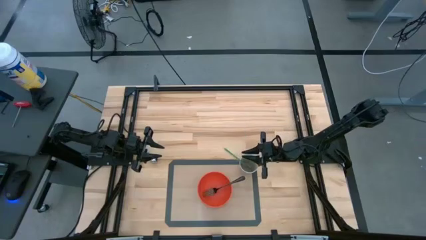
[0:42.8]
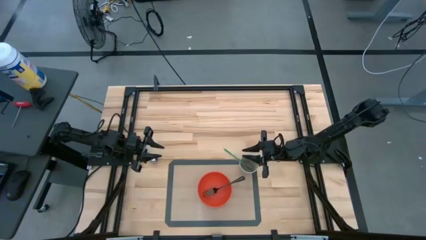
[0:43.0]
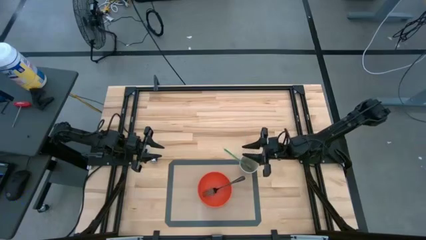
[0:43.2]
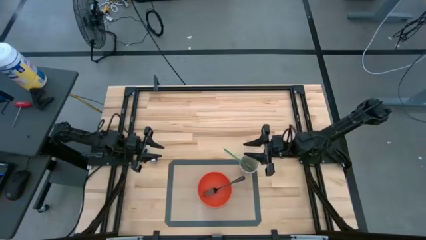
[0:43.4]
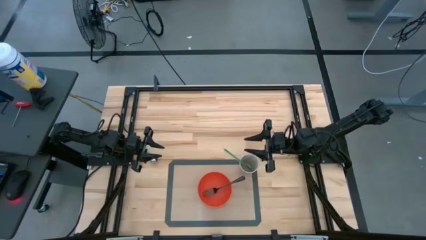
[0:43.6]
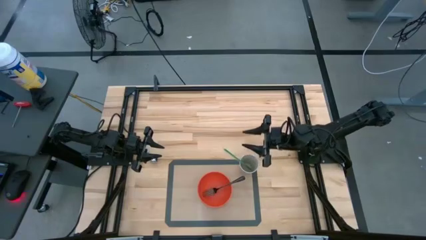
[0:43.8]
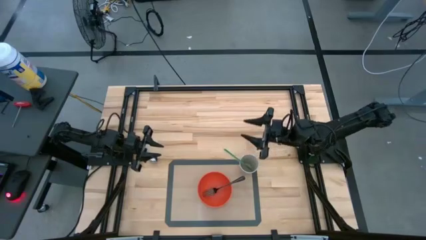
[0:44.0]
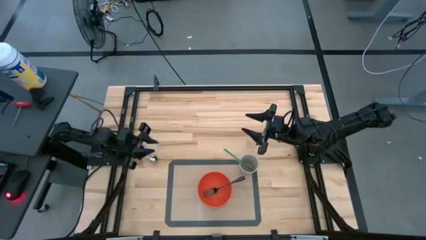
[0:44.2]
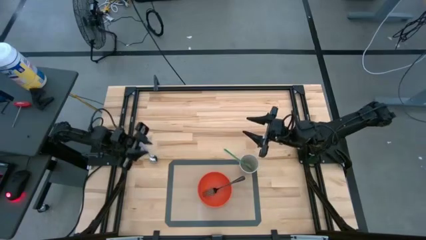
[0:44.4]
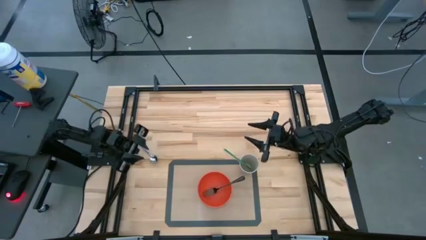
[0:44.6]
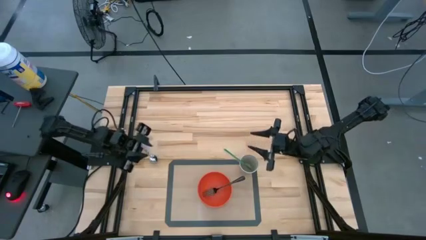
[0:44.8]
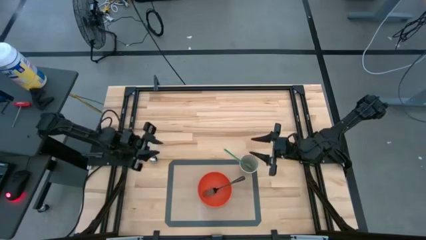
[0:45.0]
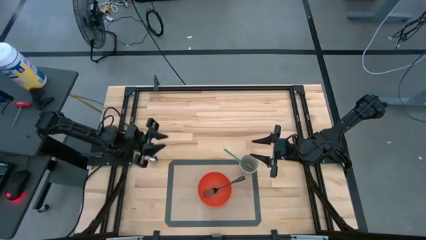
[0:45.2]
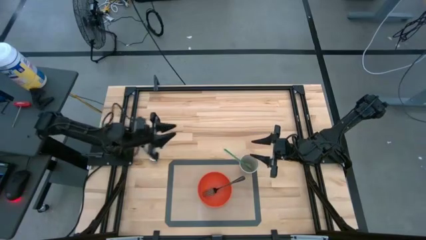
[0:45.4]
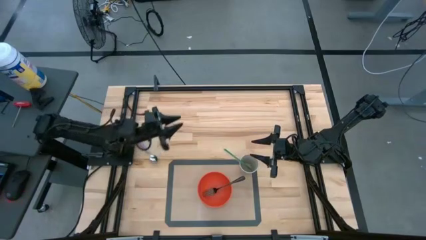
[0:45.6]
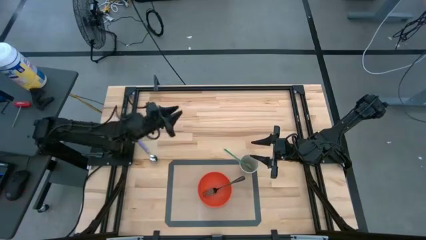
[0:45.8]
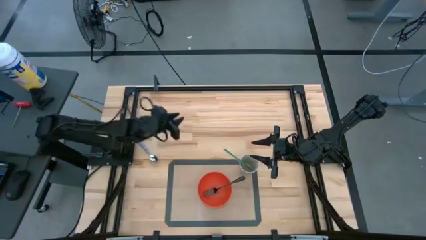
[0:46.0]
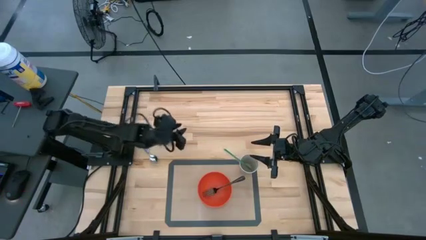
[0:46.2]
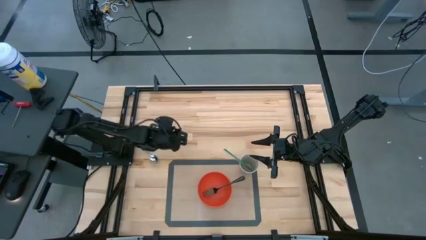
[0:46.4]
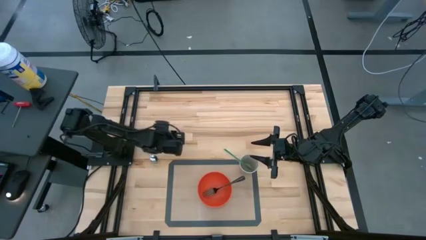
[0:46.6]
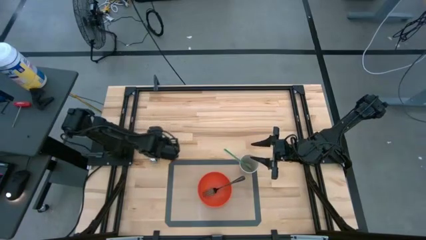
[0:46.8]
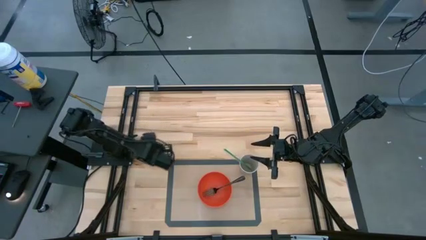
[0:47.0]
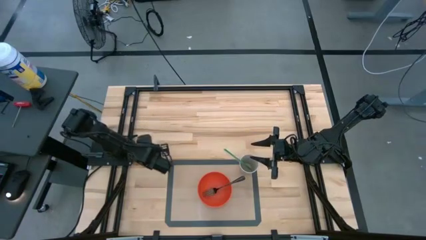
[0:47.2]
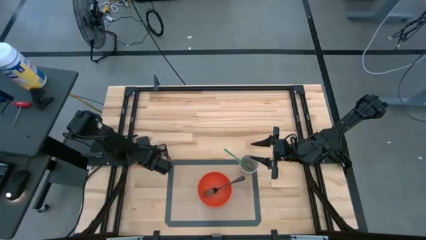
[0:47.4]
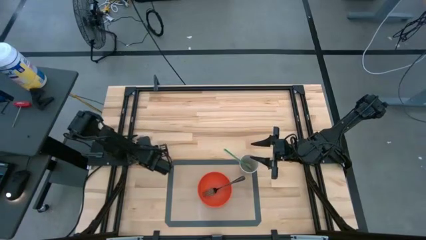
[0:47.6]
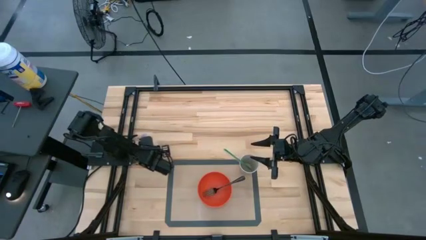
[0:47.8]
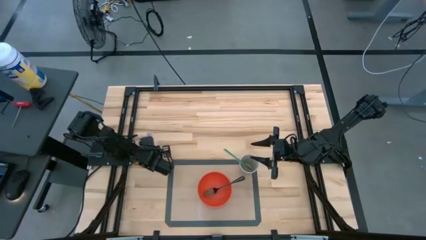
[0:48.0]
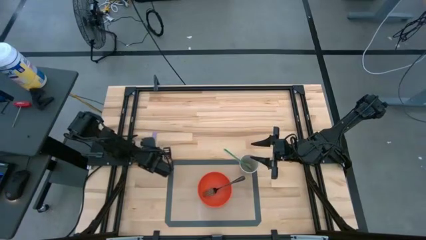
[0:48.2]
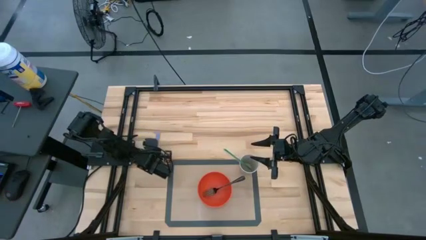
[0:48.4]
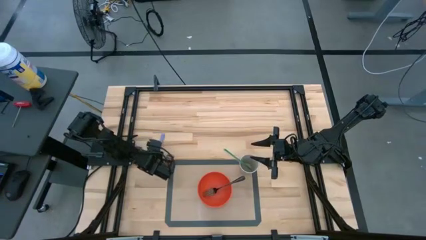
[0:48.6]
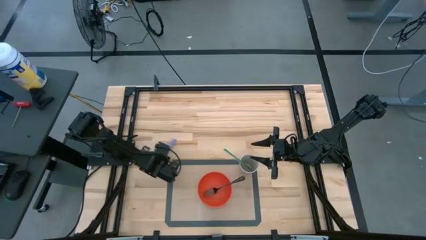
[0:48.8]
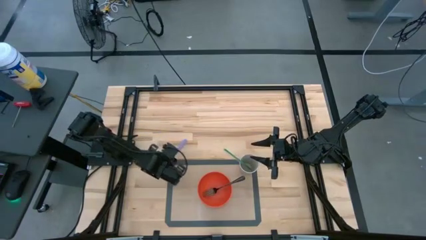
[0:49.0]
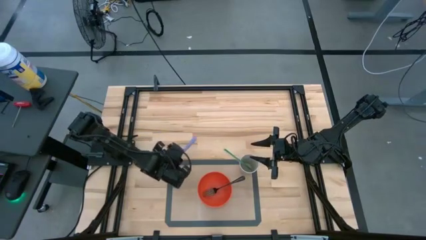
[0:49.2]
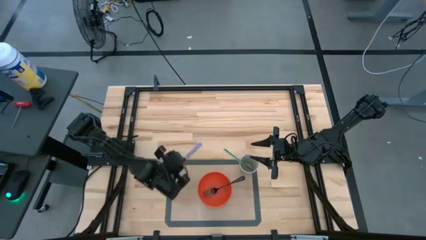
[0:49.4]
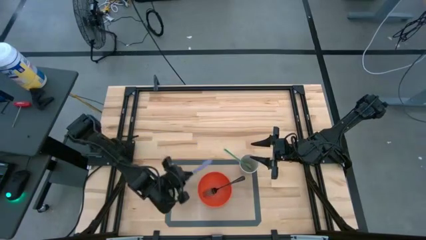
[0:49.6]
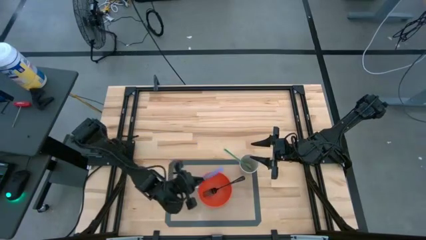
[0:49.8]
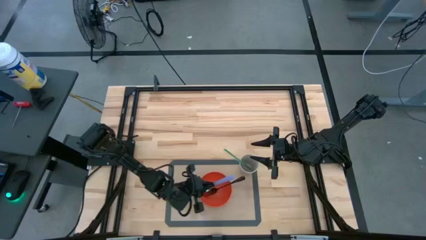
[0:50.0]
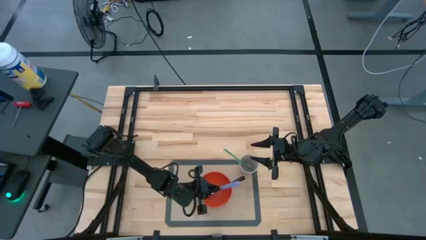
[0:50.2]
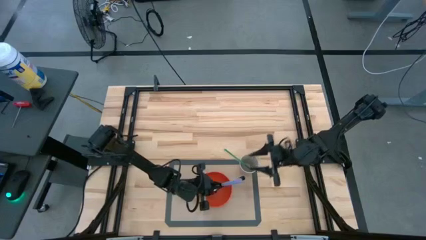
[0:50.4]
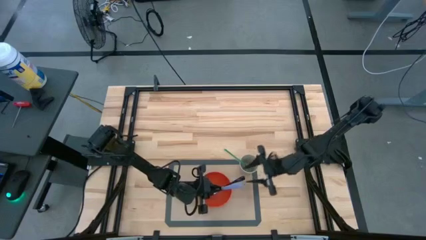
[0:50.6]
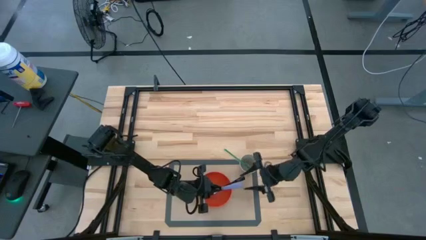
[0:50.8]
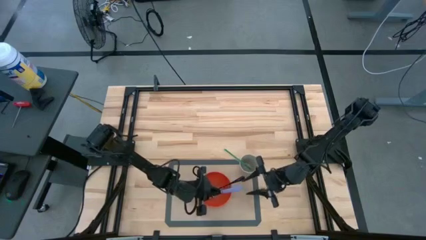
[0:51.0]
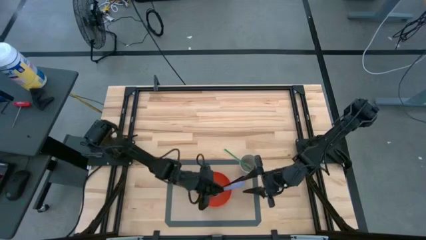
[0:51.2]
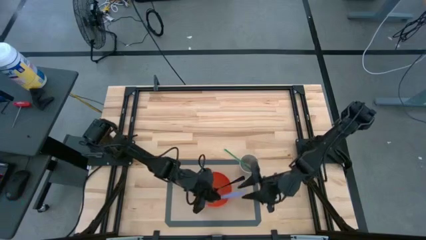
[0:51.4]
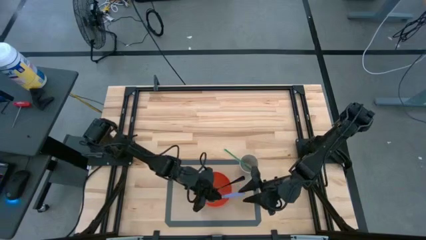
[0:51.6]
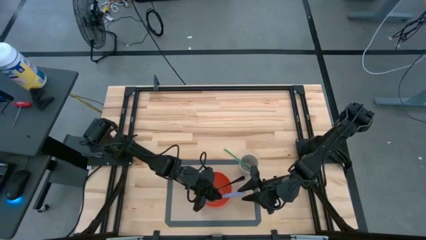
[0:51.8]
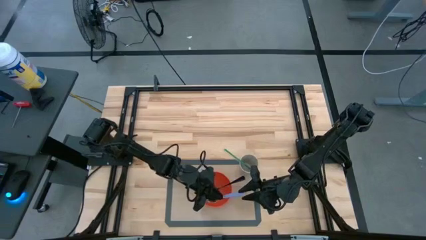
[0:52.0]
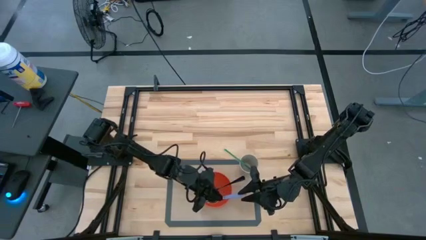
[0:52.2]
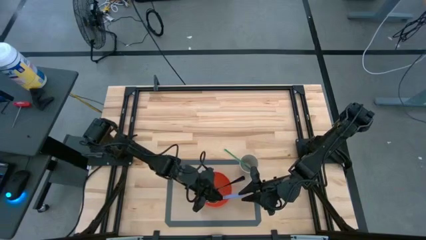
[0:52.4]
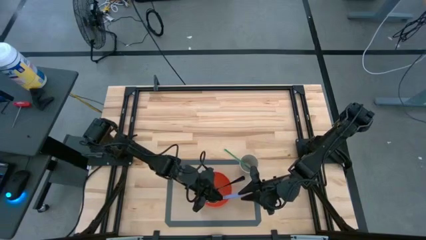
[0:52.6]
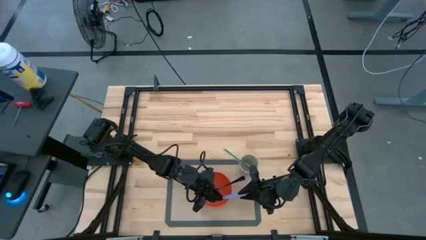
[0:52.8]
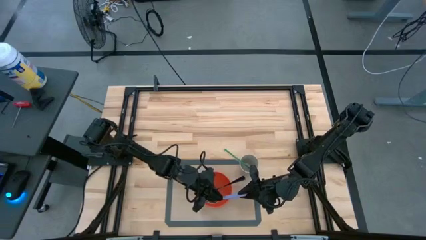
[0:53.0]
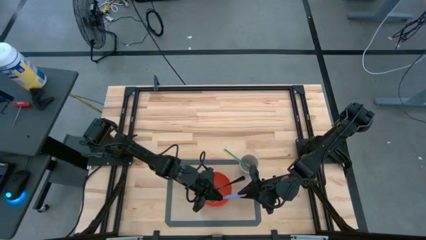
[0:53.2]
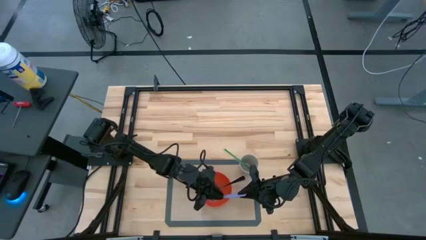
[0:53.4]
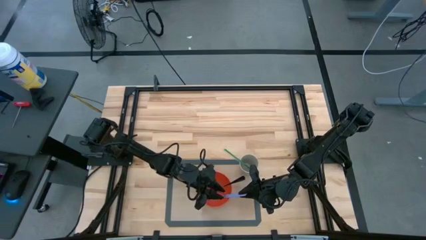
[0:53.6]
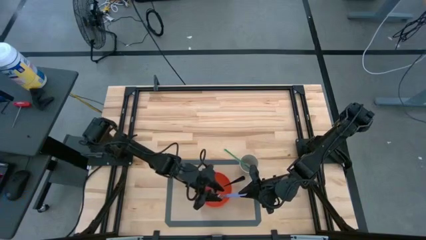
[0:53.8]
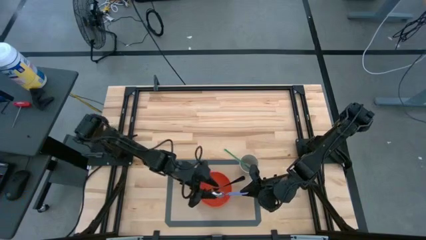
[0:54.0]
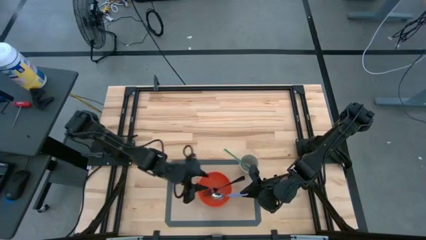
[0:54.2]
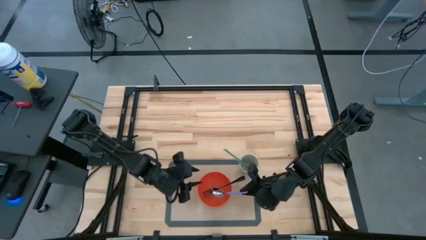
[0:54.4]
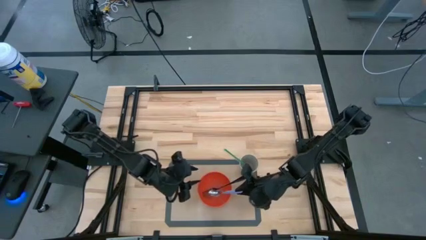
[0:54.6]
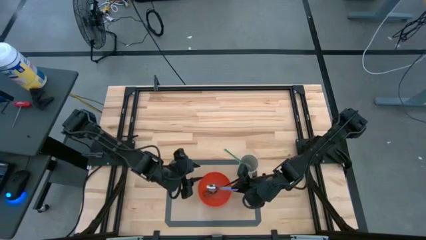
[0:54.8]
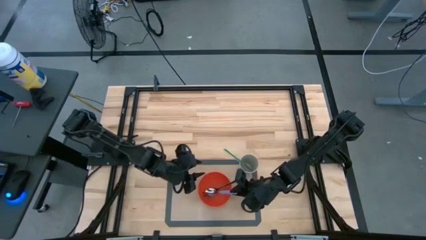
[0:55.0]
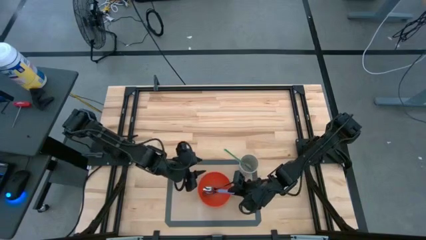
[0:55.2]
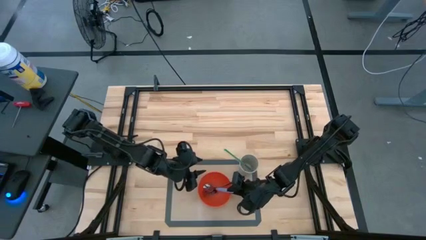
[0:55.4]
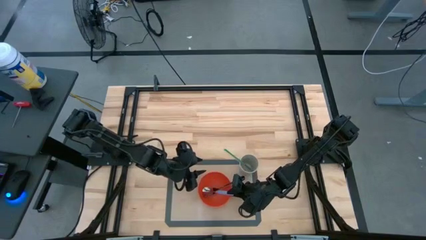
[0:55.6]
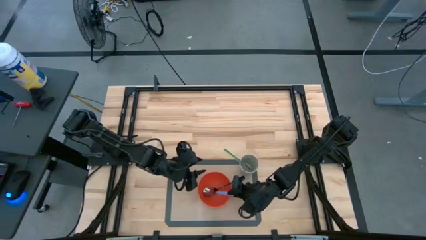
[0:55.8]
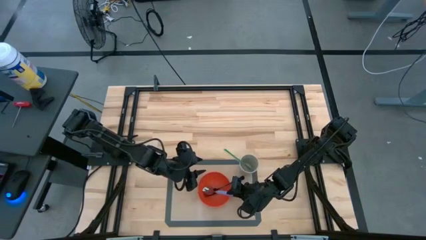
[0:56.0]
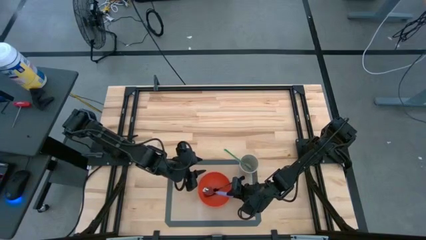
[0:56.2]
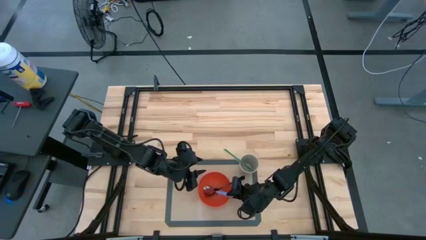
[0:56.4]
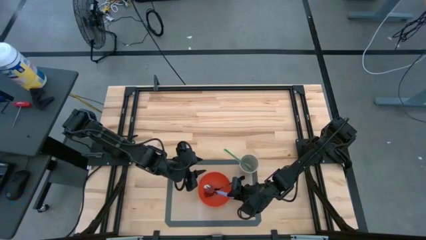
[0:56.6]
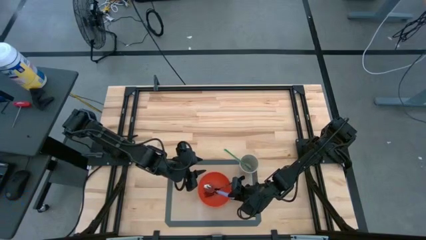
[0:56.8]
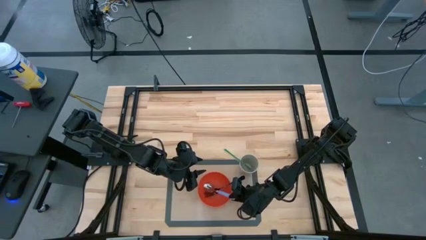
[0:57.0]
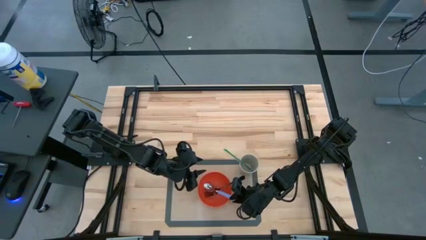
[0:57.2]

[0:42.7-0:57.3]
Task: Pick & Place Utensil
Put the purple spoon into the orange bowl
